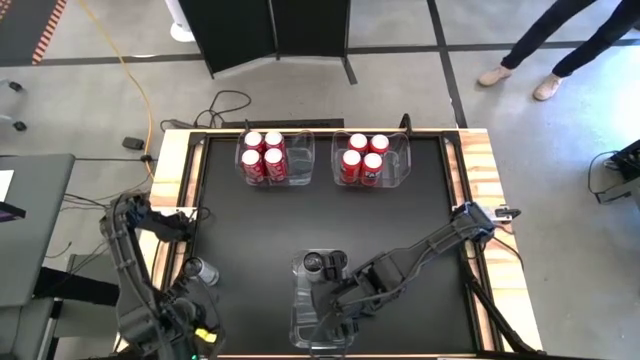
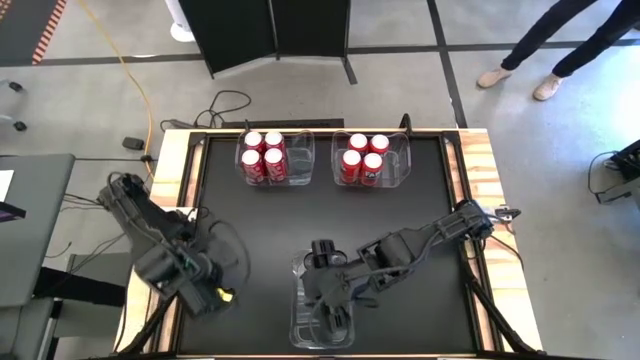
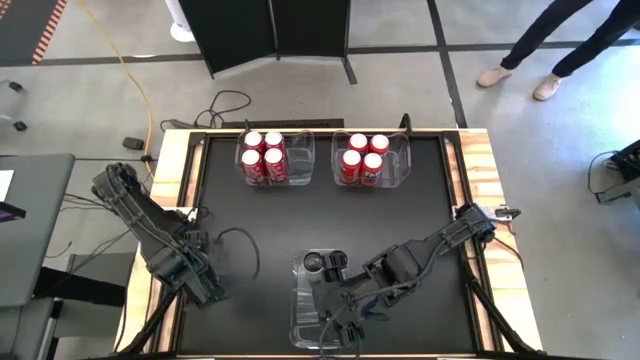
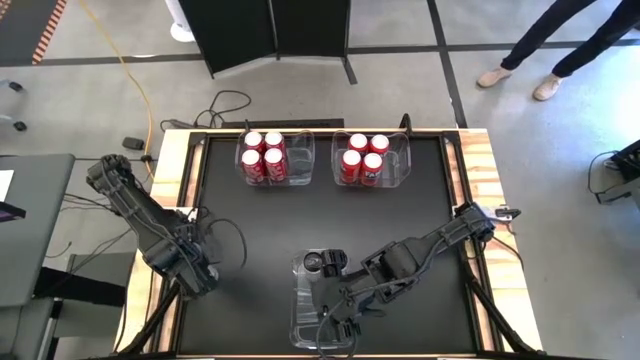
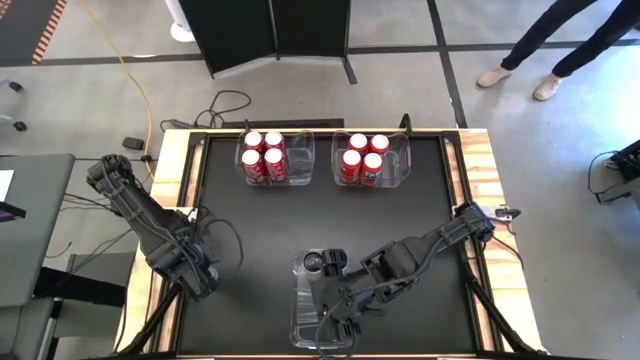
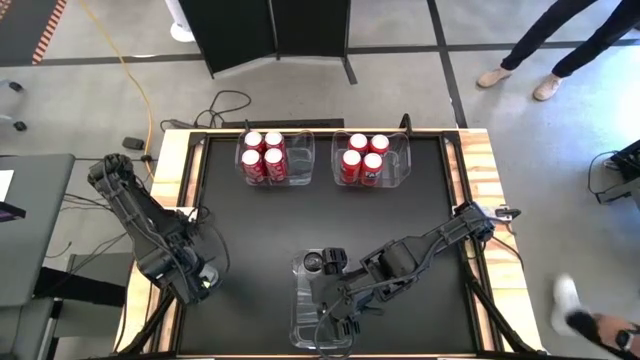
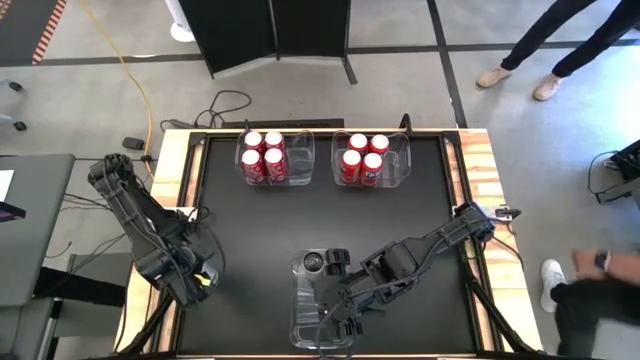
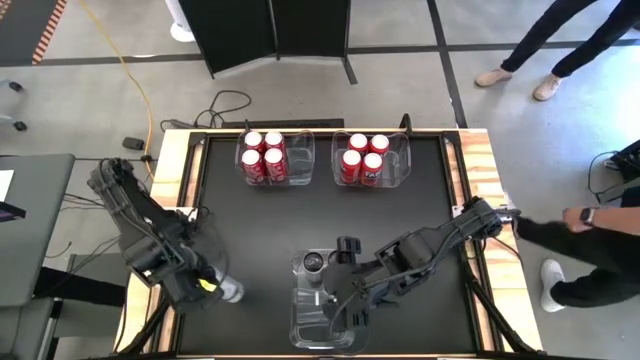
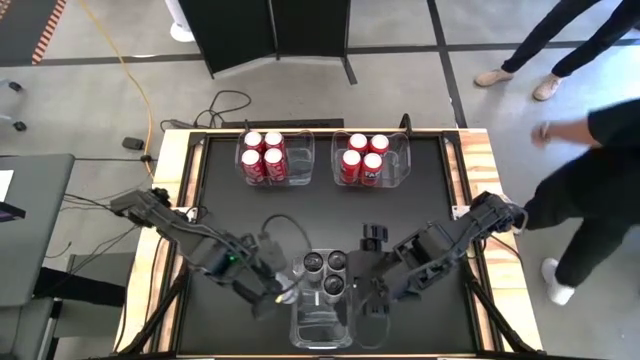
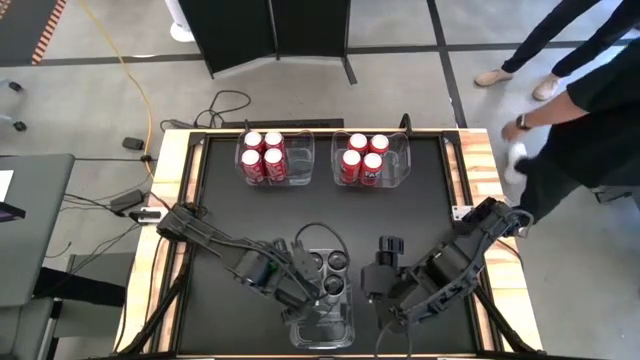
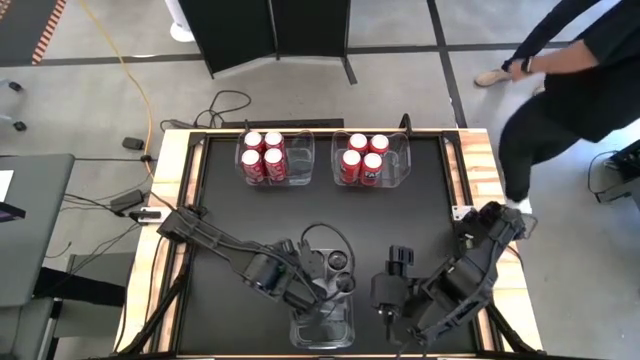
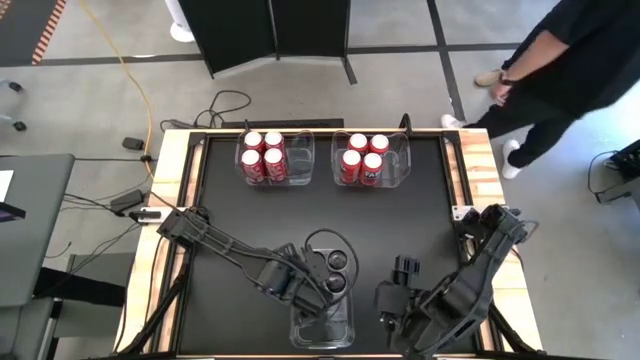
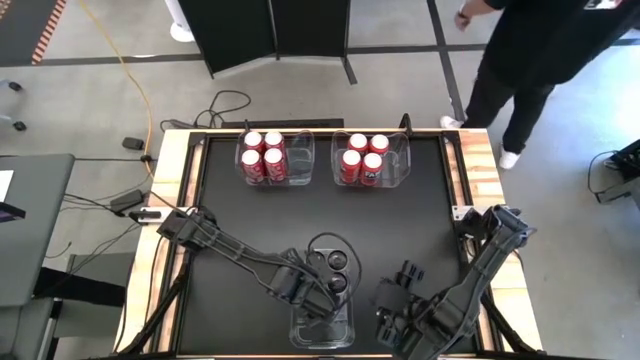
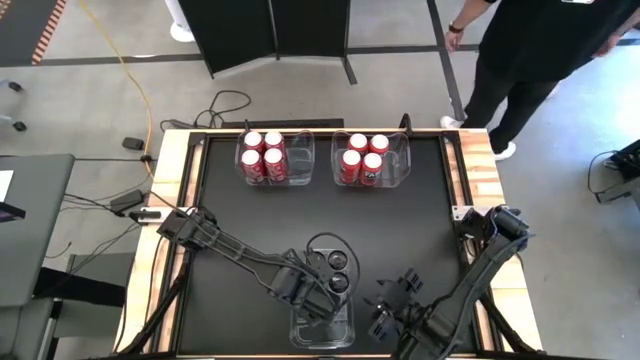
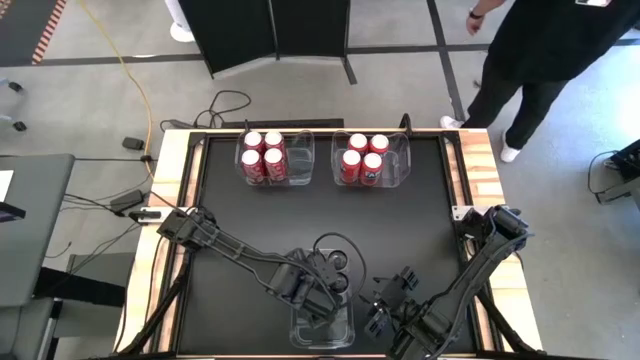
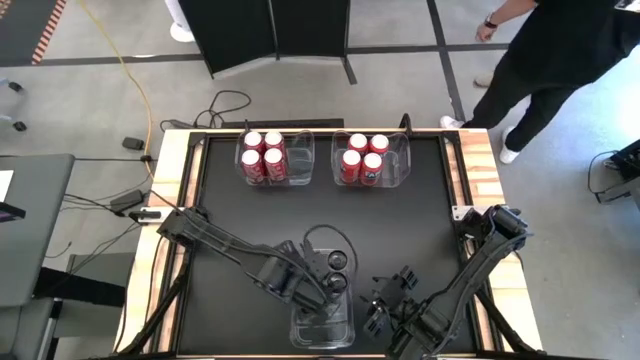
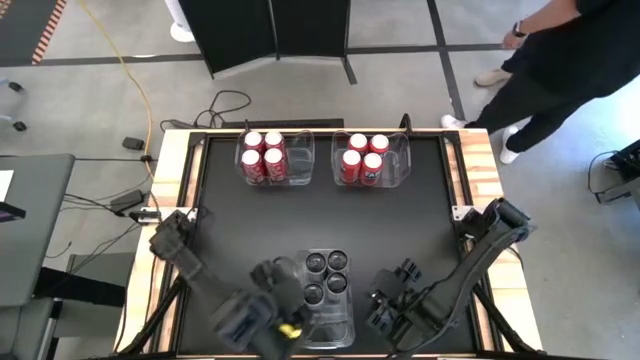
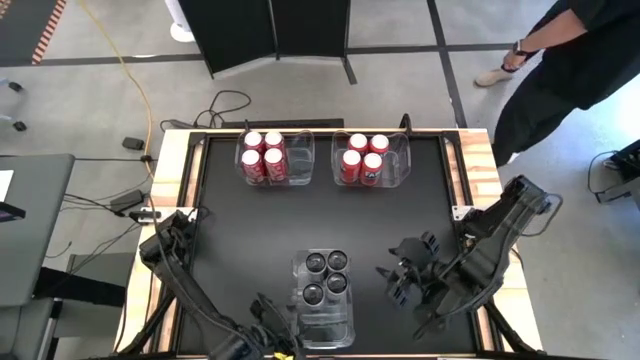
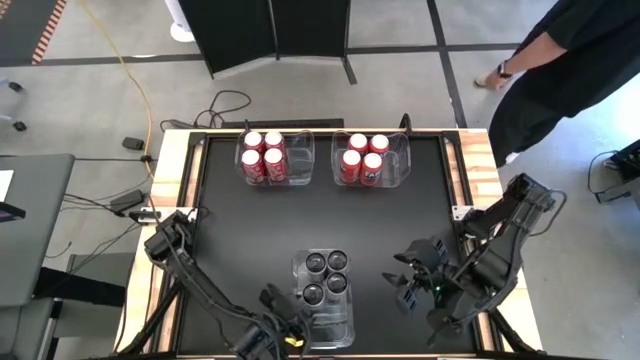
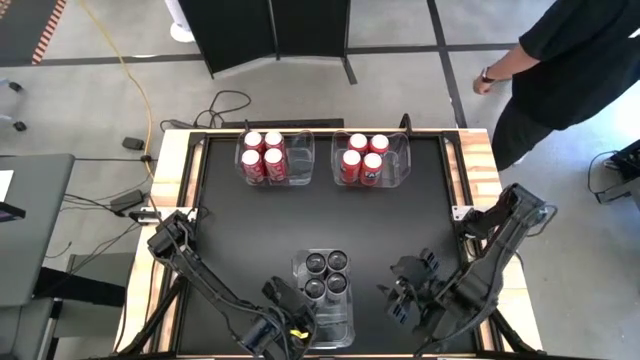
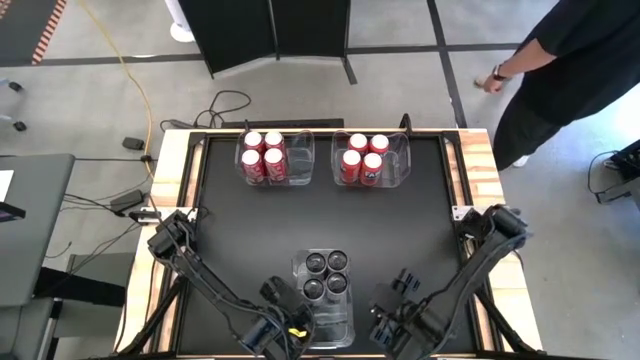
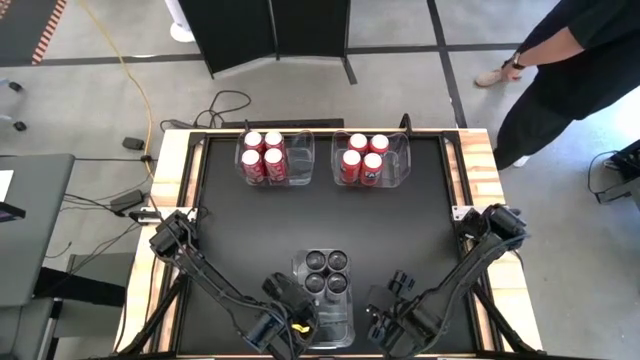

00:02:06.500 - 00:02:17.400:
Task: Sort soda cans
Put the white yellow soda can into the bottom transparent bin

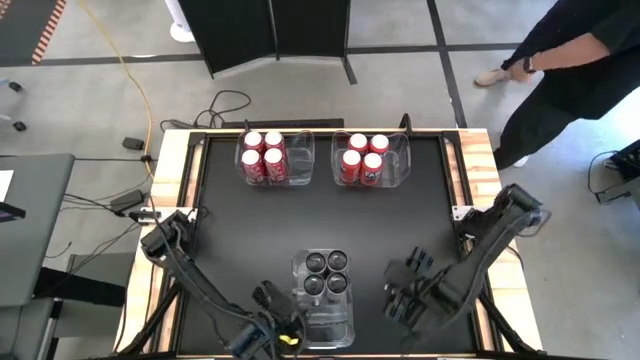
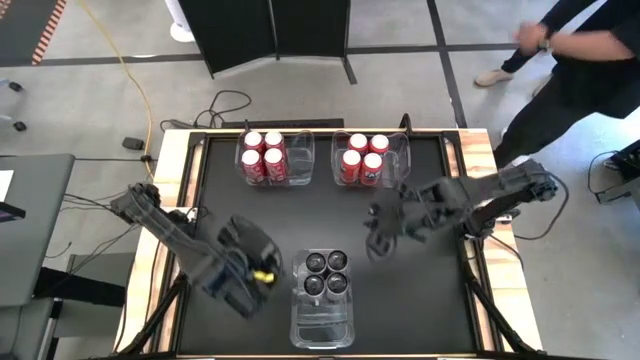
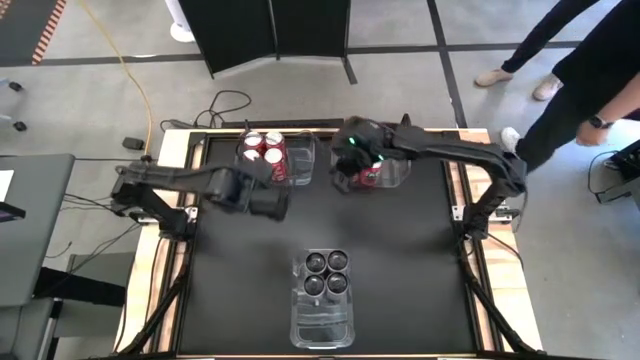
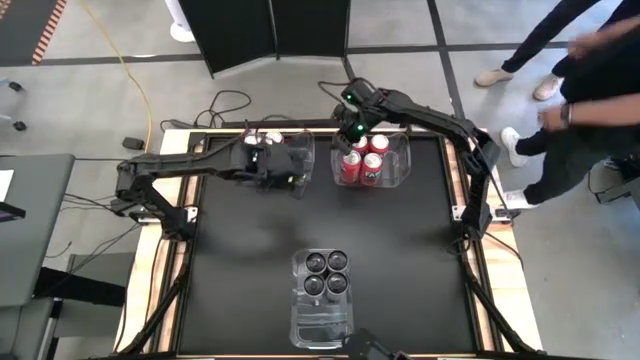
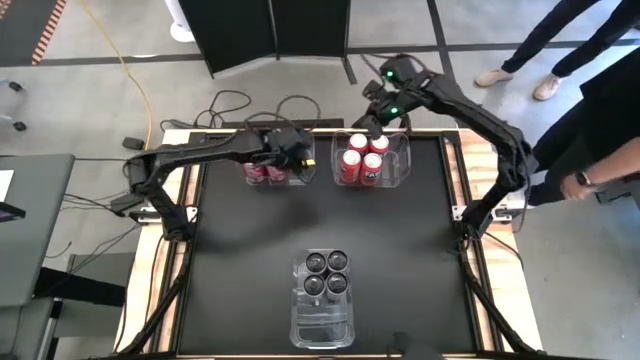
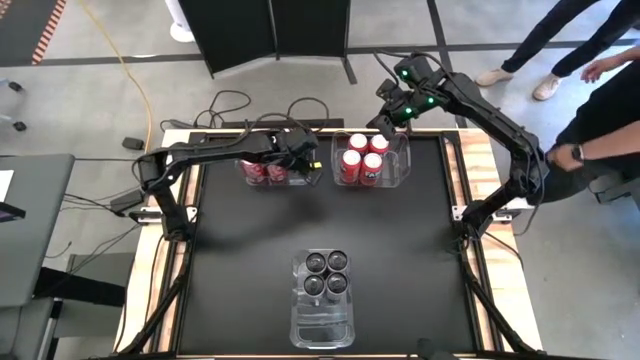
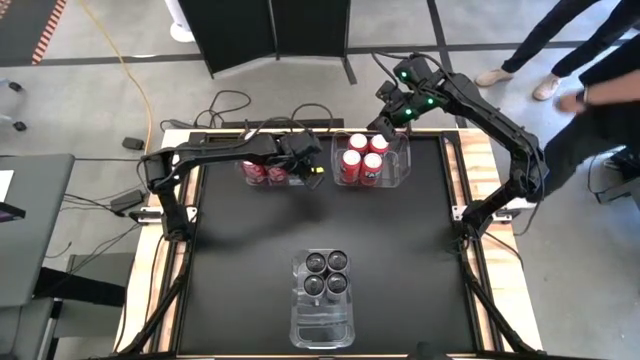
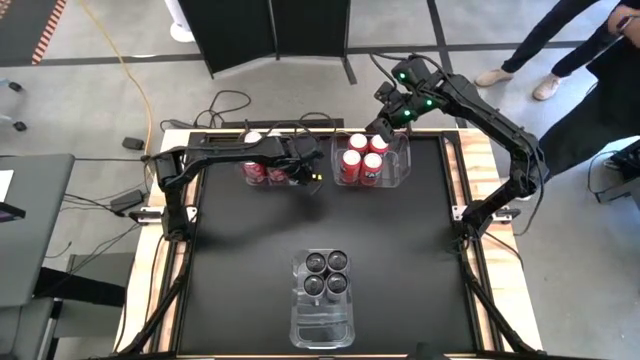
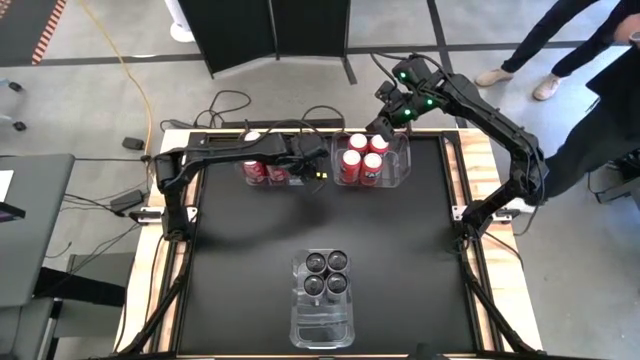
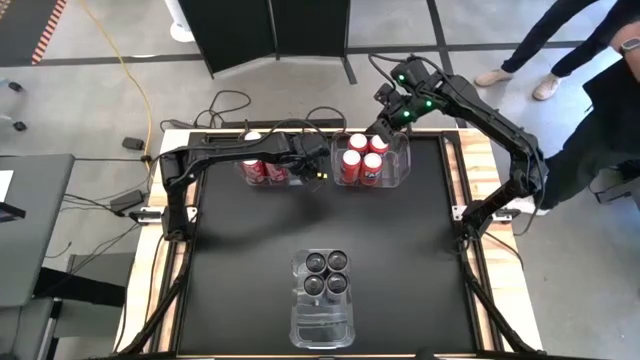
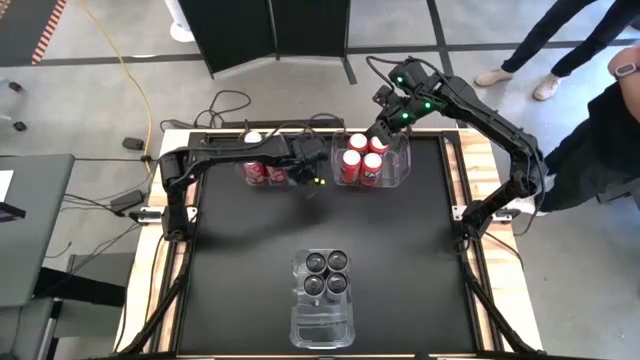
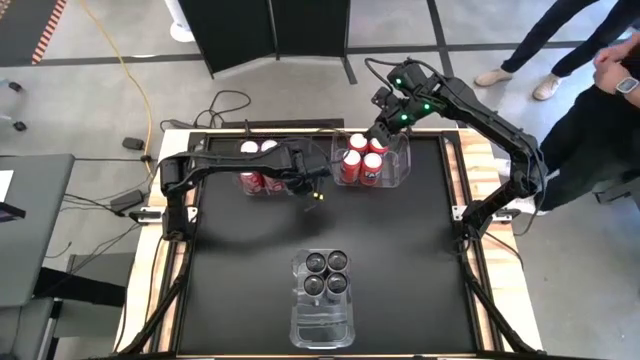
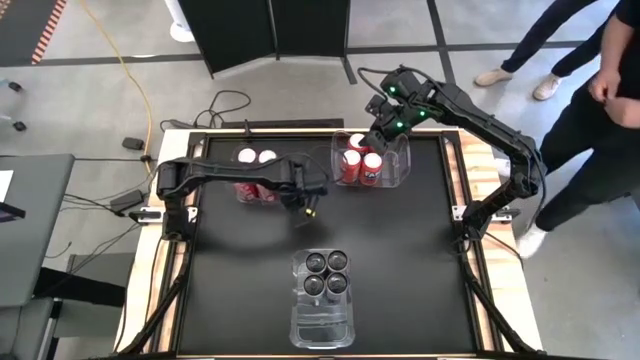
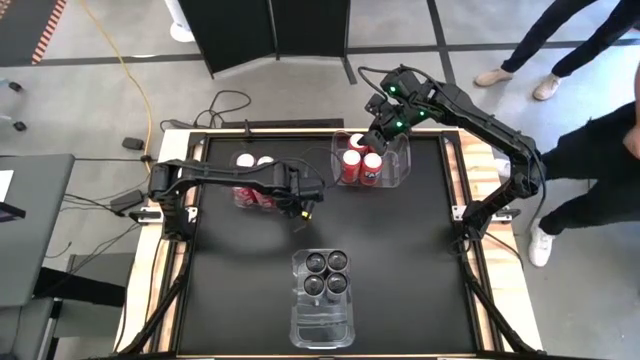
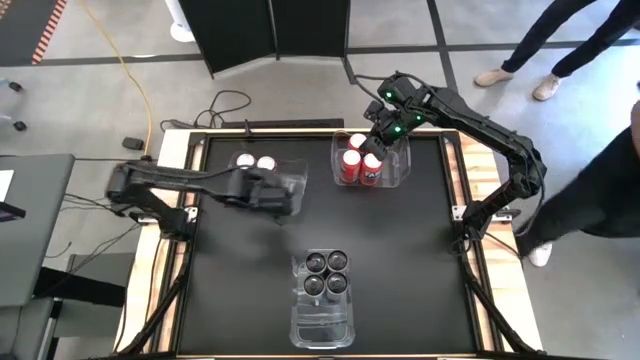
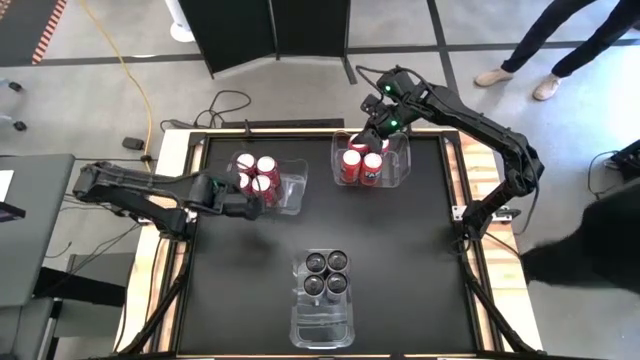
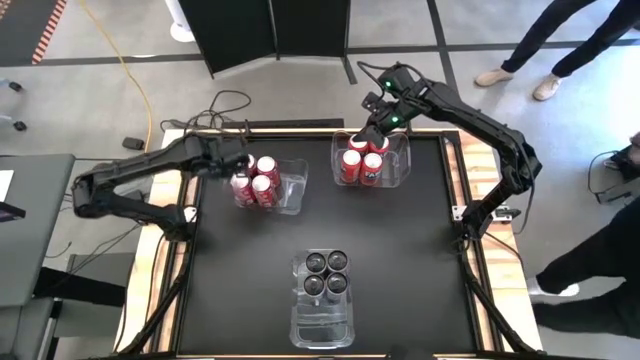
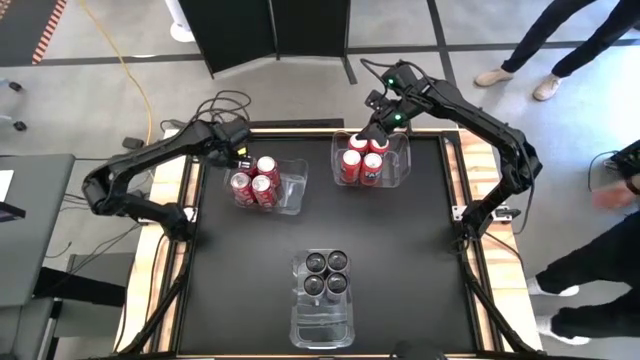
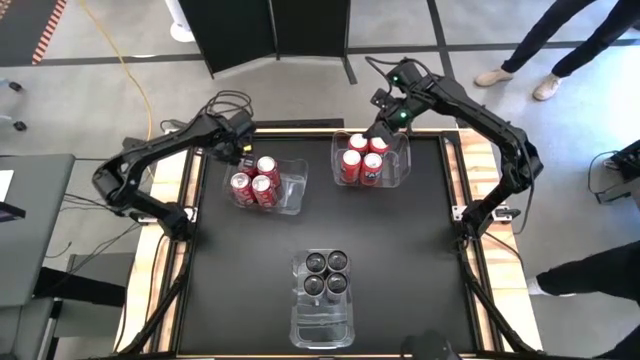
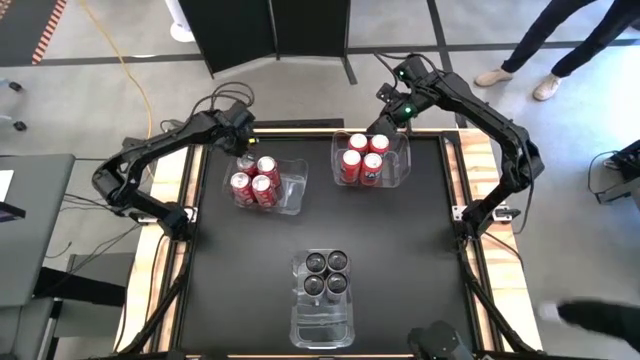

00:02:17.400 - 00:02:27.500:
Adjust the left transparent bin
